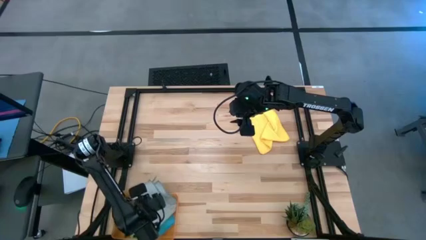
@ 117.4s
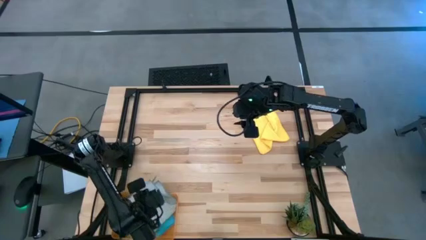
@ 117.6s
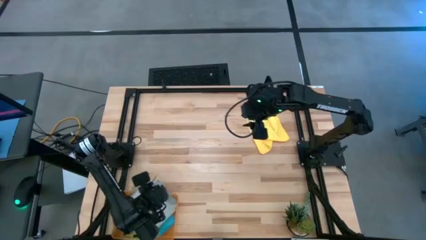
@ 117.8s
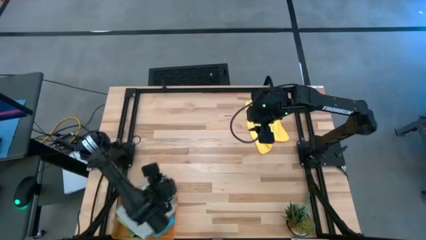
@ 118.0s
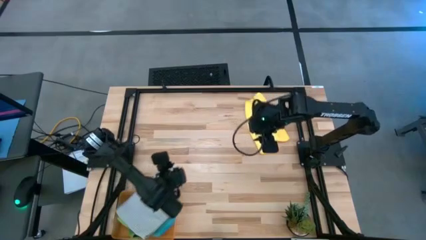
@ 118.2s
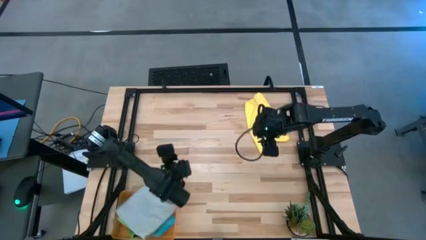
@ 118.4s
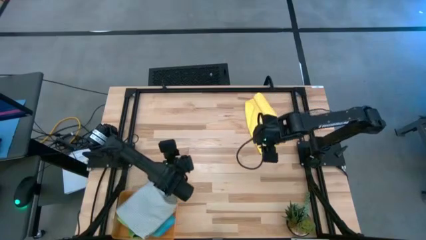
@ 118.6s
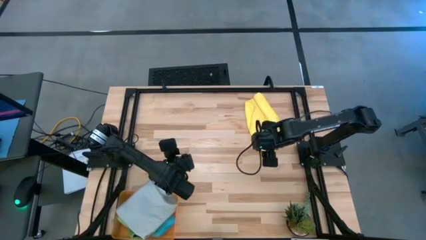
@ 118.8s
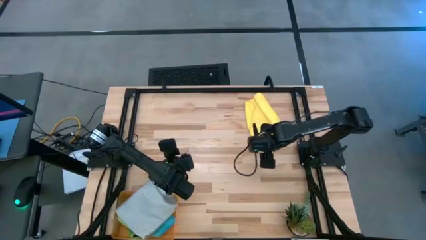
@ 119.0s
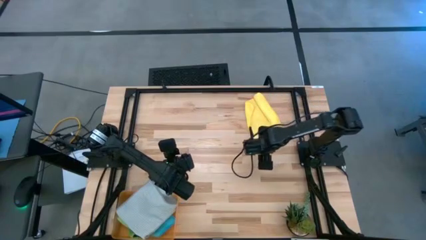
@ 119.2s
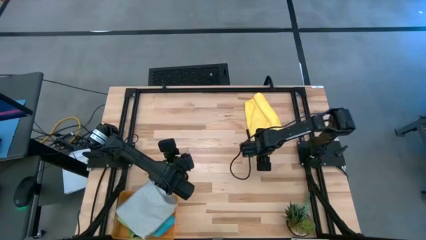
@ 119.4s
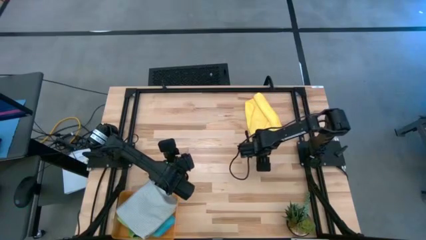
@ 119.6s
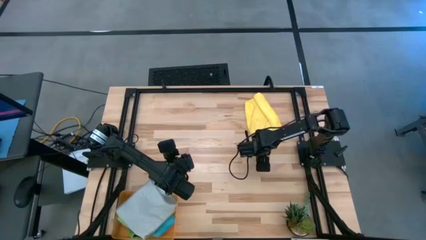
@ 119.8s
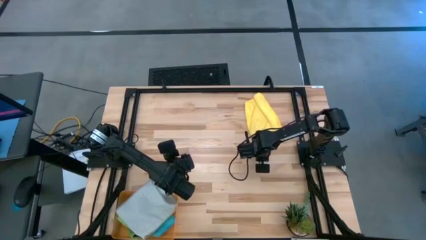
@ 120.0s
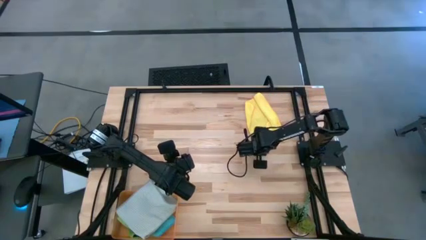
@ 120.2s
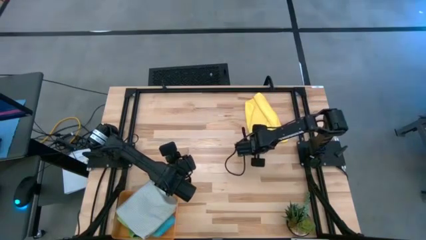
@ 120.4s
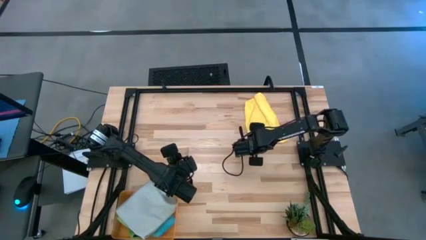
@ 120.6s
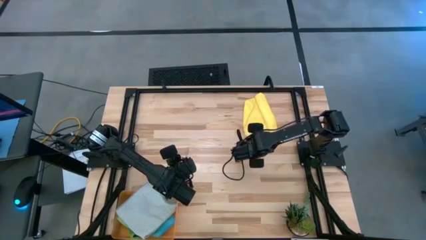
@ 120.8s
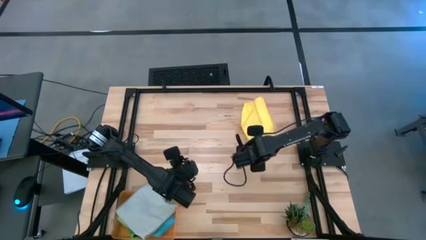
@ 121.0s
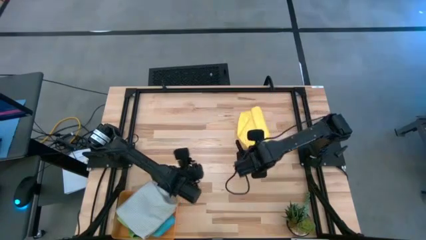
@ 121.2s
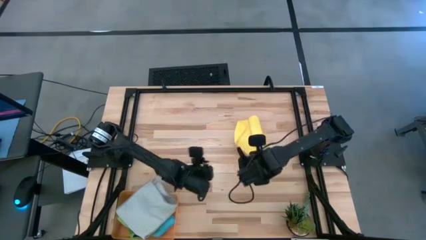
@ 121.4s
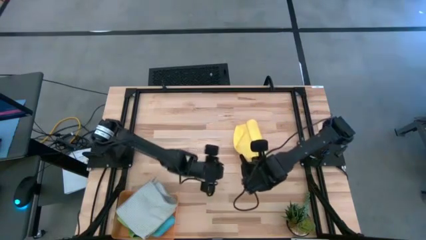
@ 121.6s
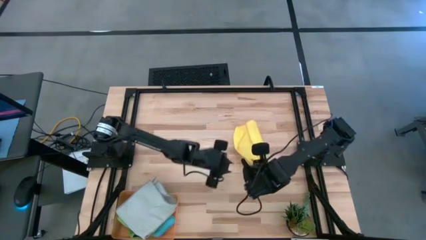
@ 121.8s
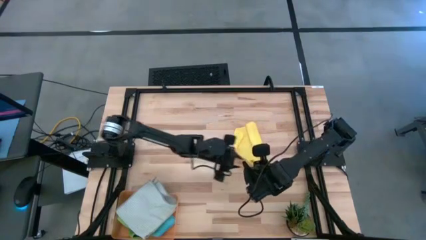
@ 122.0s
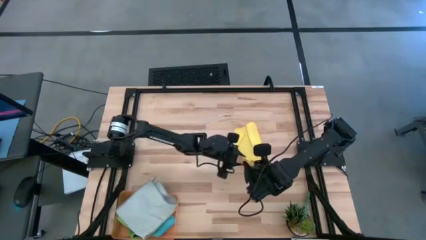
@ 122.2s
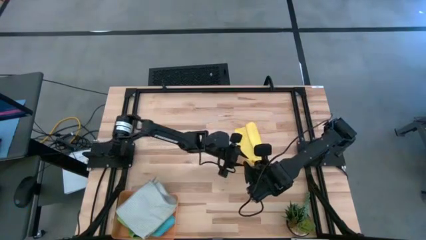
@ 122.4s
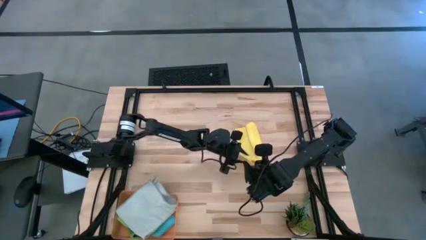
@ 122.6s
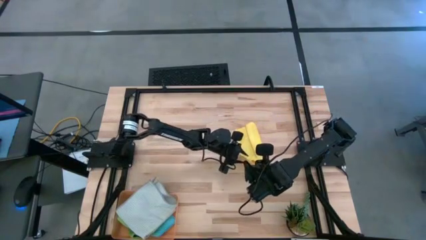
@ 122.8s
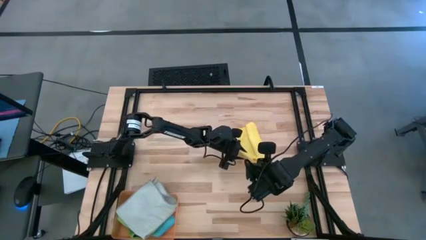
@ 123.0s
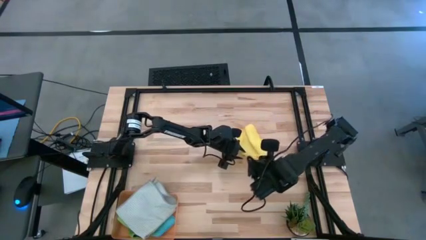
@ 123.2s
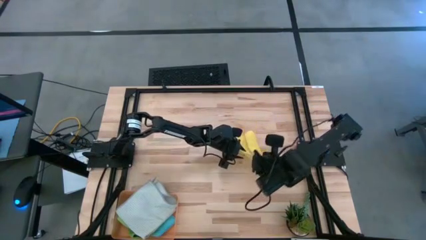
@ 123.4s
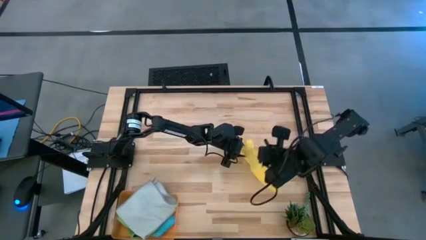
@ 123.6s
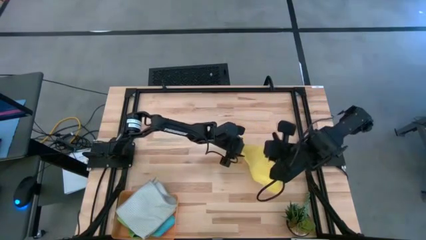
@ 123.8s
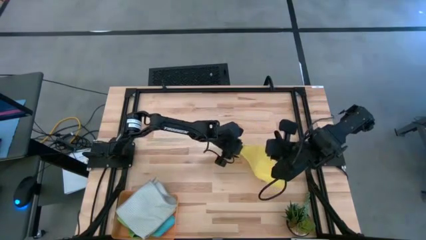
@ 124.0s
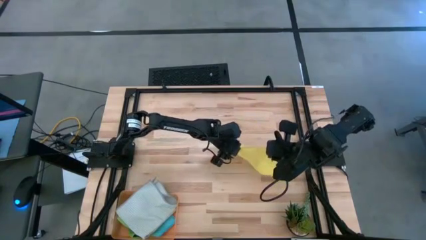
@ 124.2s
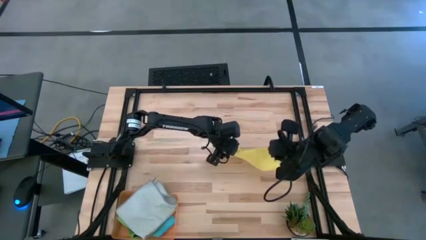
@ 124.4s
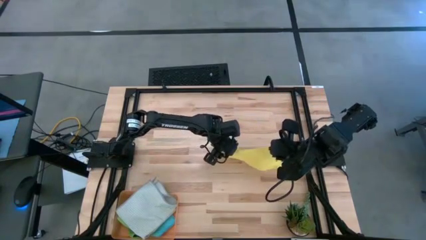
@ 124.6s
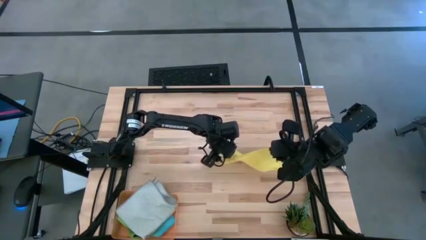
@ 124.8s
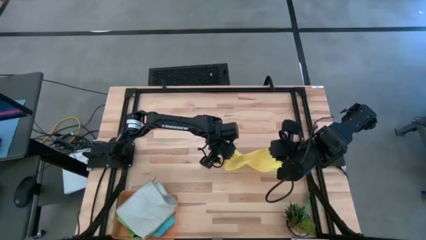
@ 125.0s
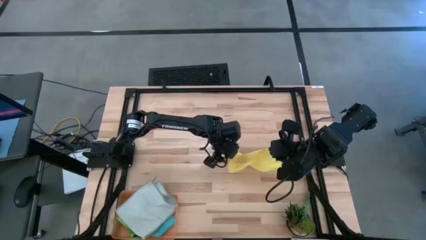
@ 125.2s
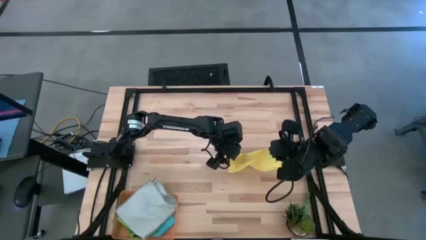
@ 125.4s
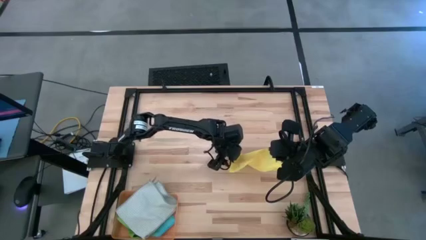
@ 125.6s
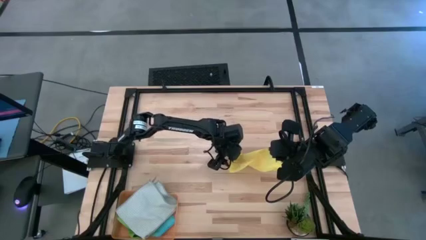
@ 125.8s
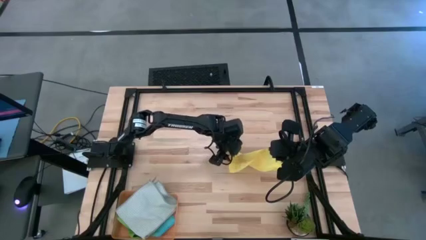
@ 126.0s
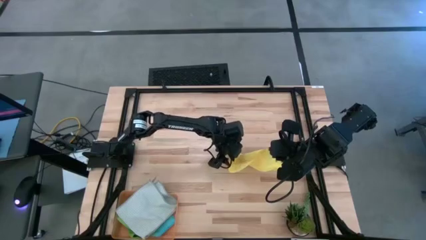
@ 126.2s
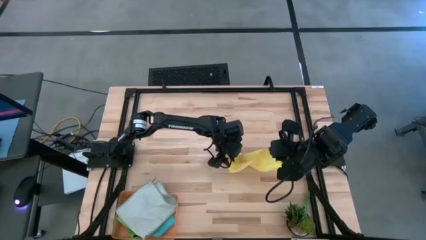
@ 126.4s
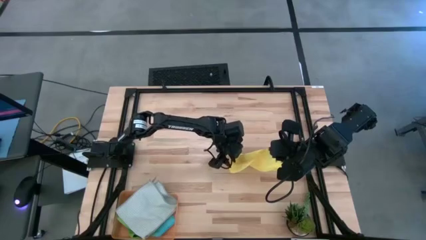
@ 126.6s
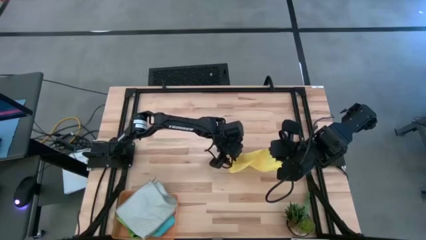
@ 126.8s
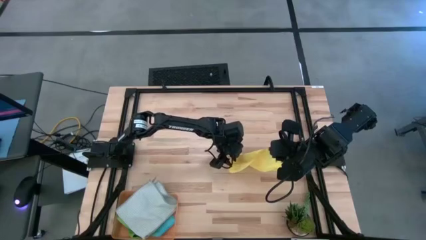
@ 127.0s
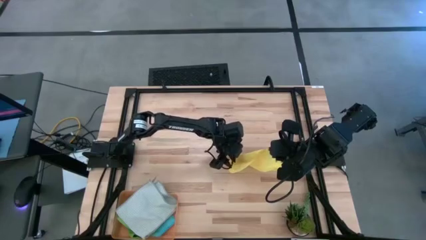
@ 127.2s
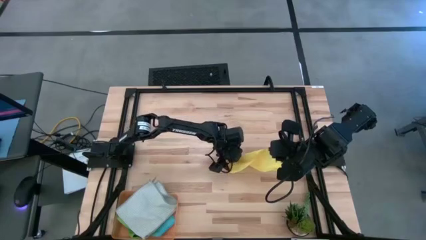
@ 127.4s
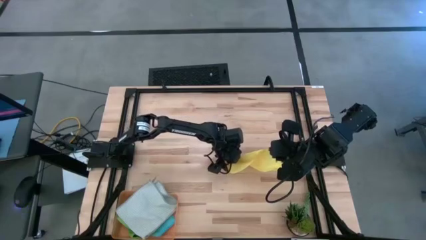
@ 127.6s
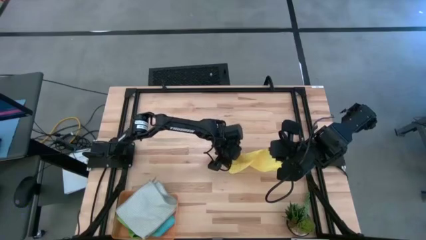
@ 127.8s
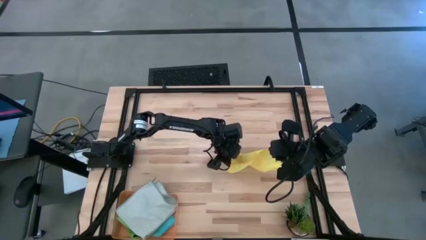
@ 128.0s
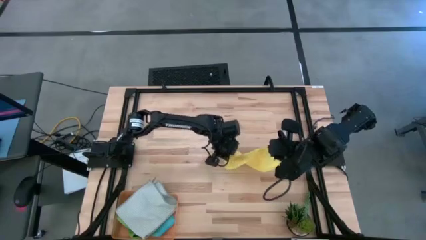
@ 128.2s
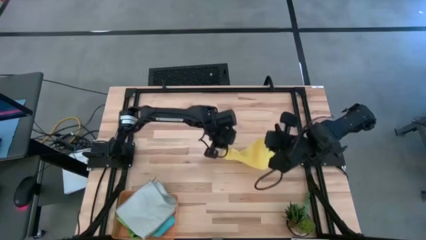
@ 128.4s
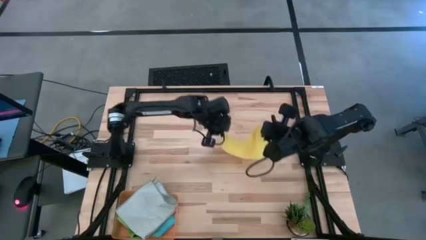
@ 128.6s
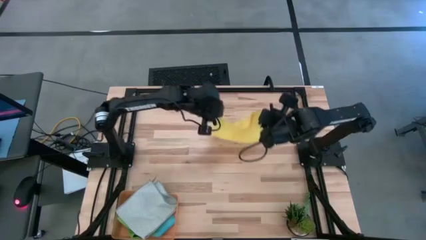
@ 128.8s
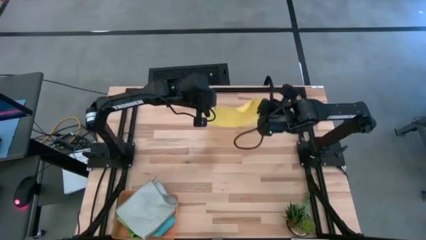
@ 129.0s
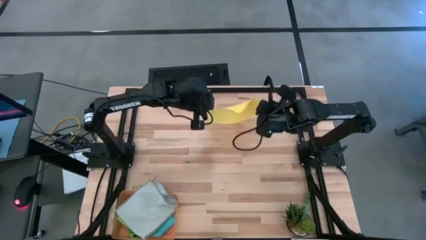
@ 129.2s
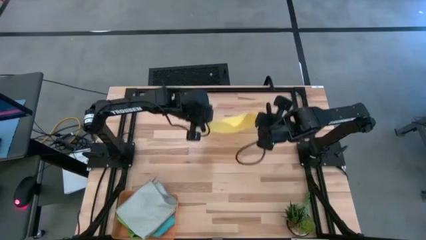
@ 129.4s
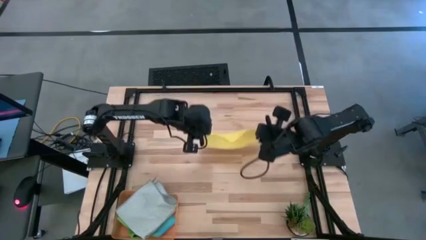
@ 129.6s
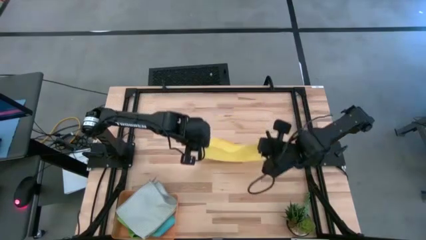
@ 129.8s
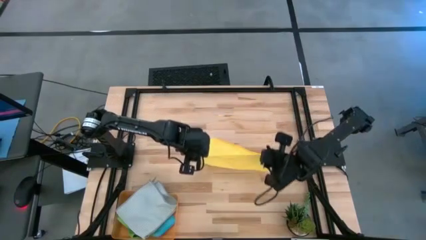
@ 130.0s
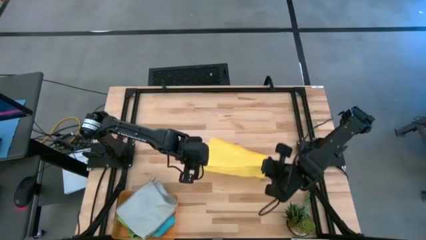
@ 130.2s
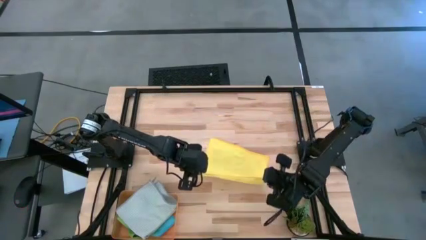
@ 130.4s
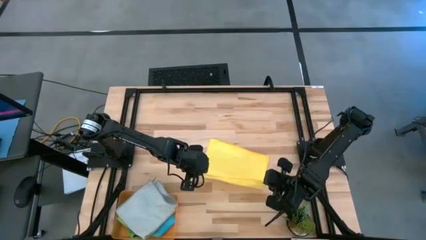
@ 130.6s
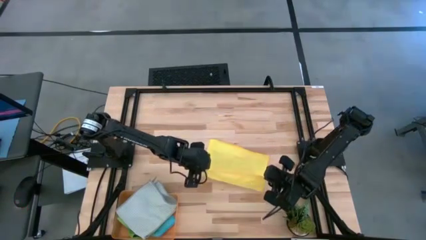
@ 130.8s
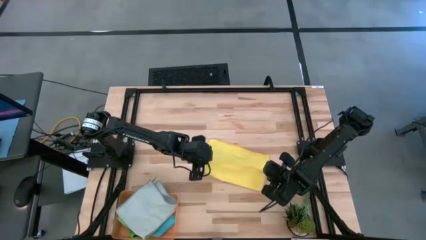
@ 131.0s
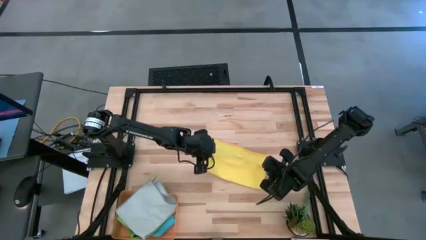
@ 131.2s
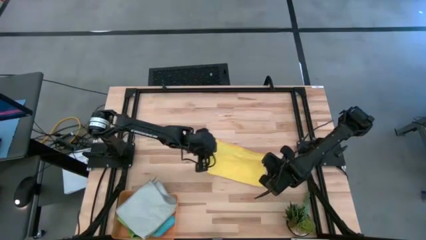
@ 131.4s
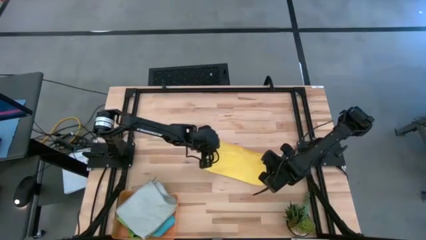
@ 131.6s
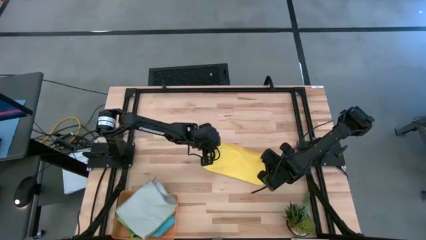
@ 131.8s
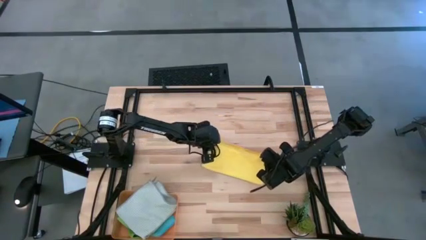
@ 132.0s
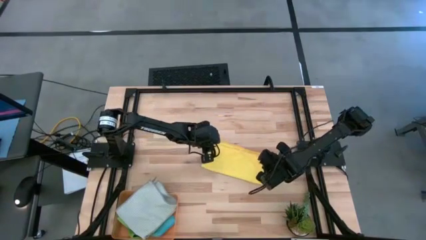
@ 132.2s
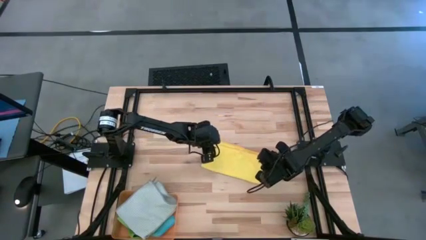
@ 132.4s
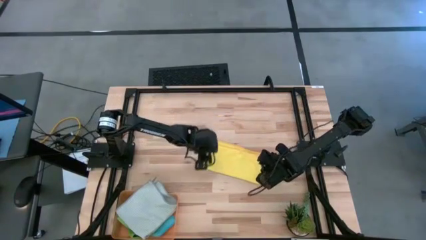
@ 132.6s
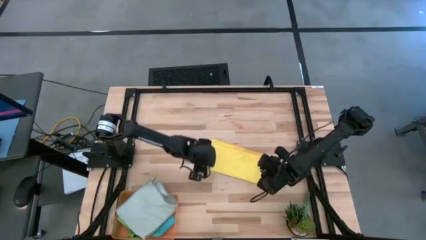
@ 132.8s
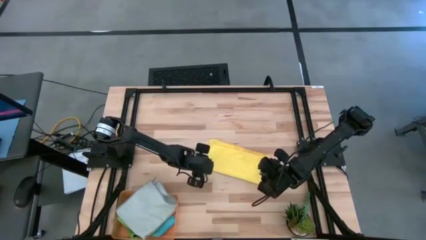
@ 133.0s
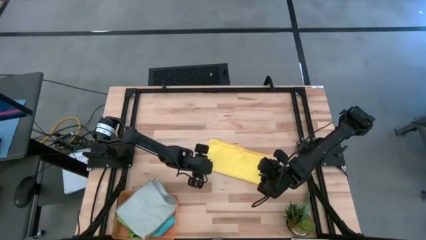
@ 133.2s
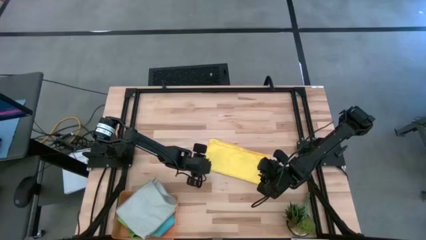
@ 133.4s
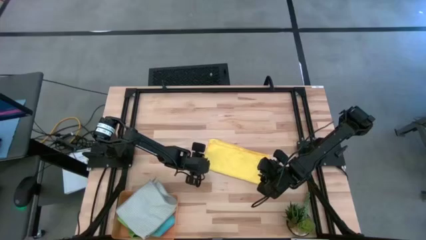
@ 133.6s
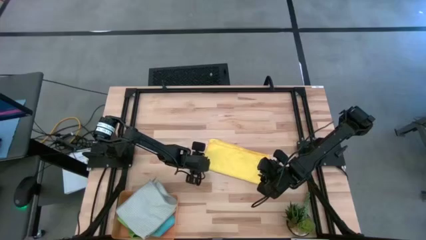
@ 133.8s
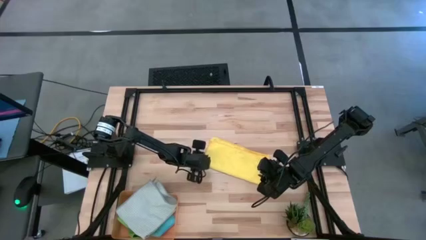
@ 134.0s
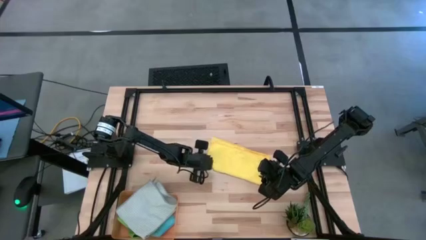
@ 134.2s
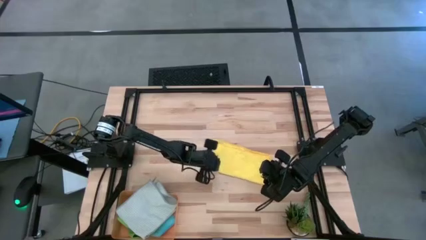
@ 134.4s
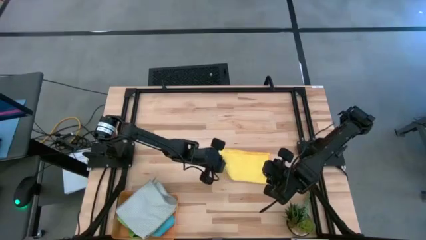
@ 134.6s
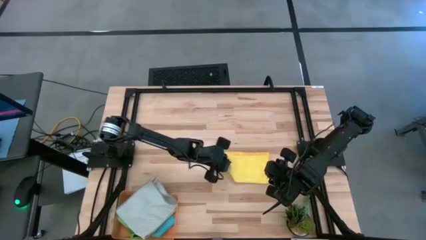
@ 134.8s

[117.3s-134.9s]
Task: Fold microfiber towels
Fold the yellow microfiber towel

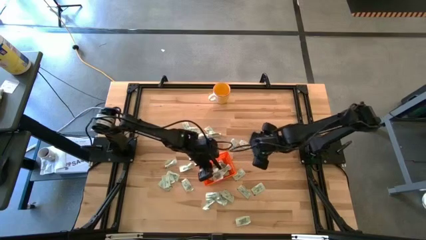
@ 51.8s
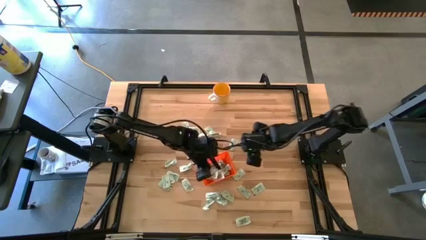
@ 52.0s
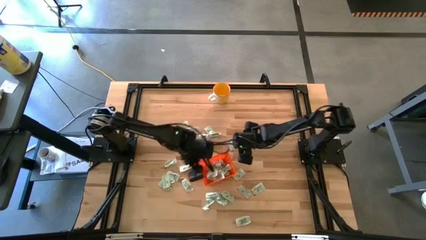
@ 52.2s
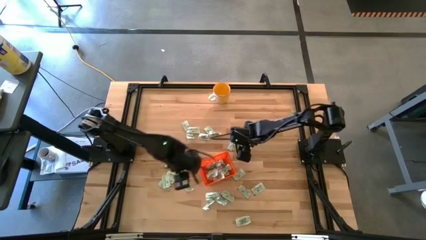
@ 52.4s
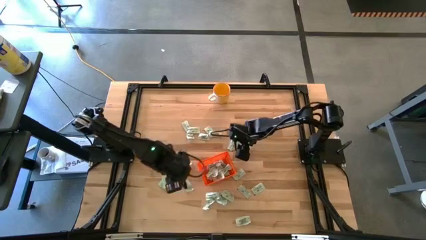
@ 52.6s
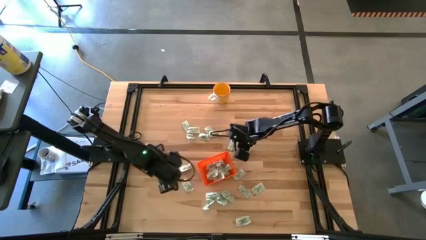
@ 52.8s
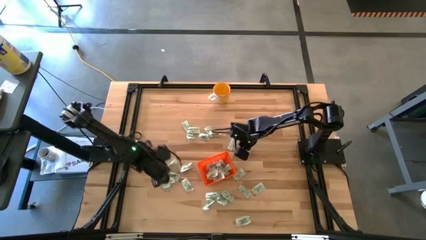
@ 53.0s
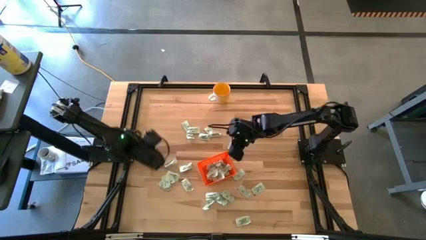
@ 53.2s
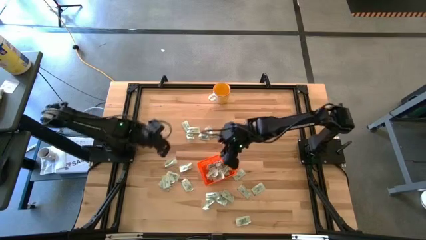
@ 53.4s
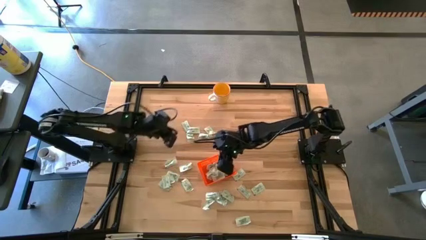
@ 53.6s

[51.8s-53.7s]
Task: Pick and place Stevia / Truvia into bins
Put the stevia packet into the bin
